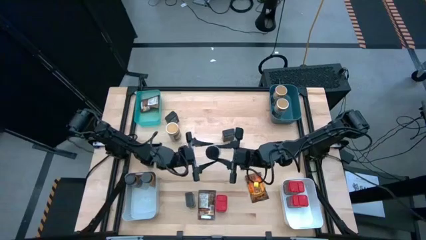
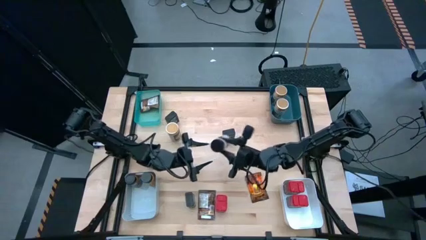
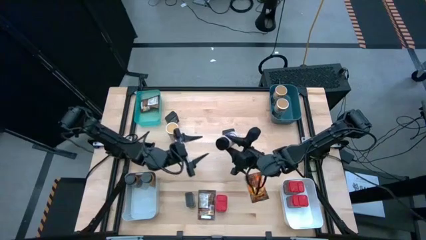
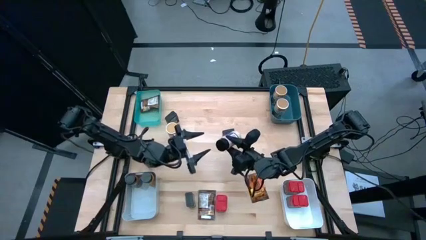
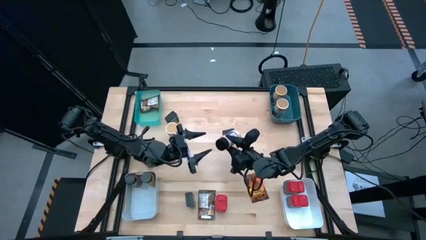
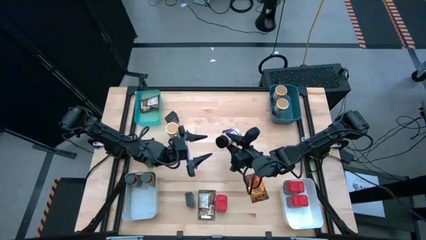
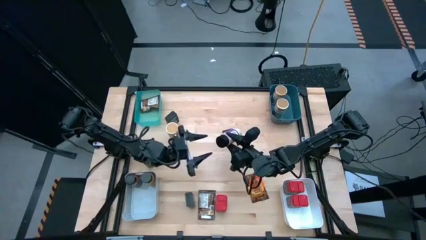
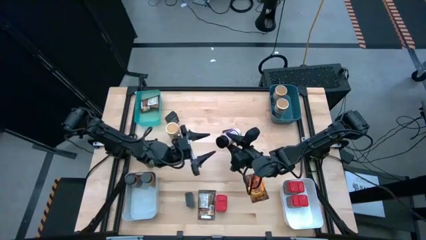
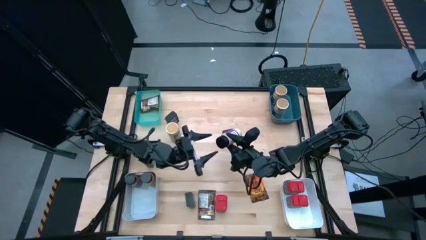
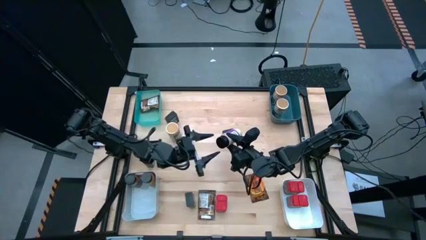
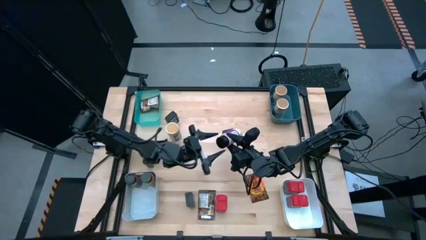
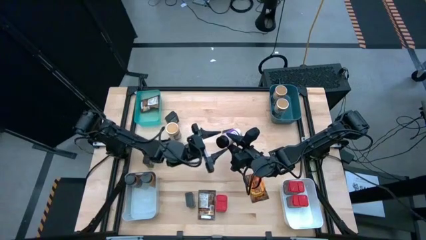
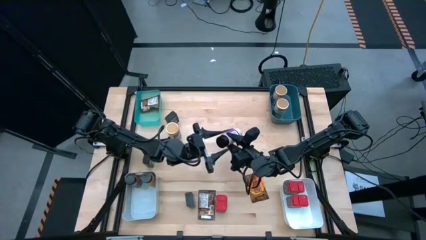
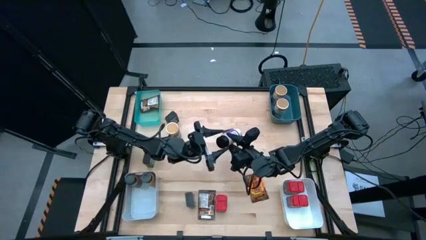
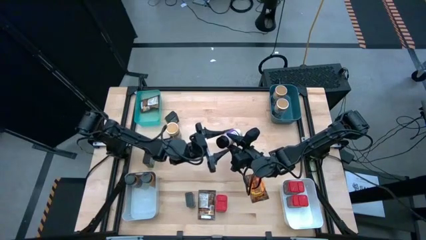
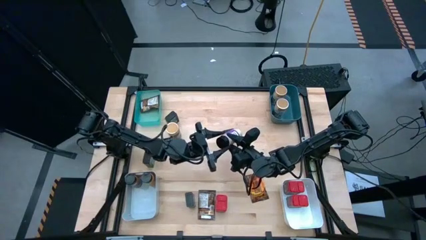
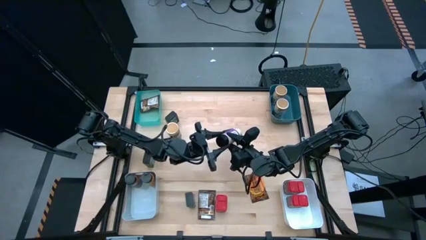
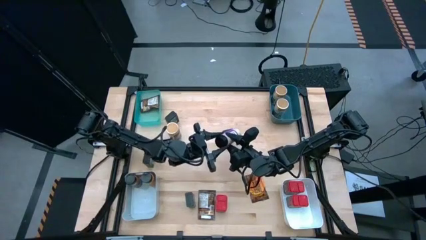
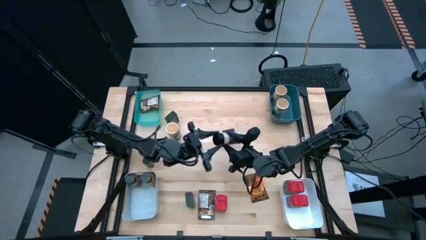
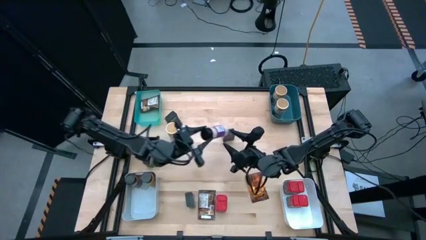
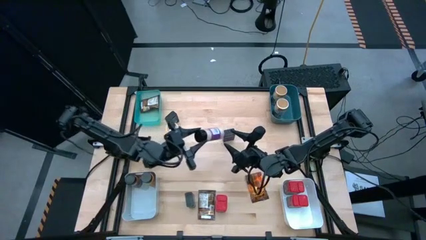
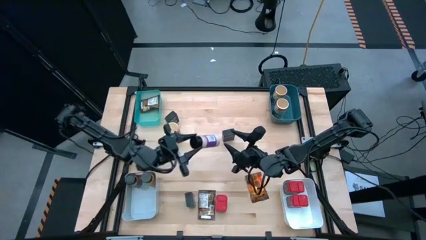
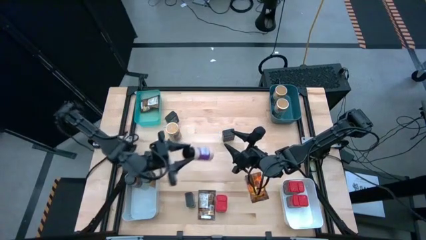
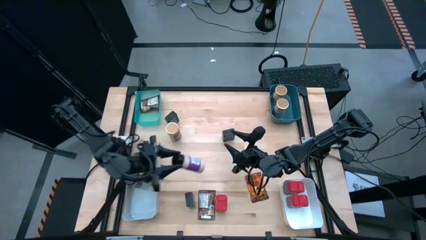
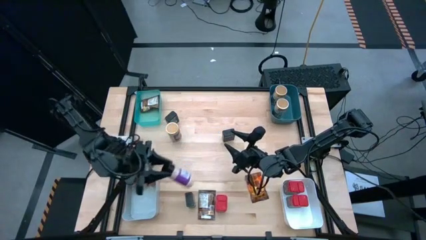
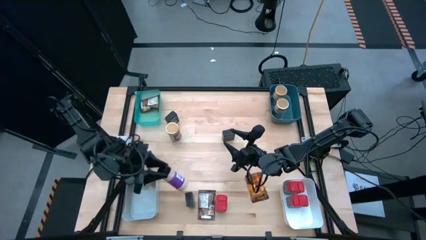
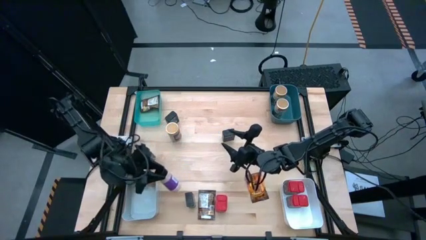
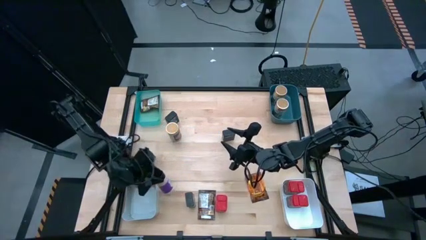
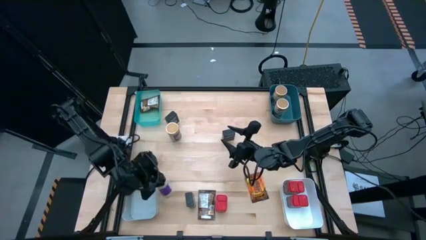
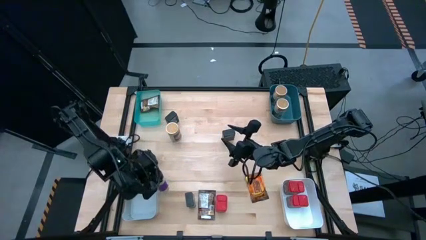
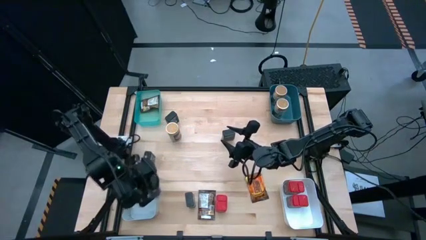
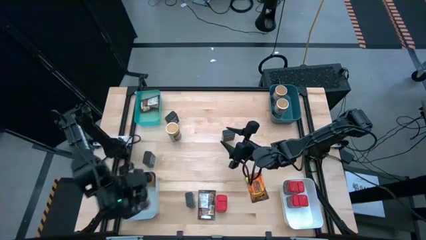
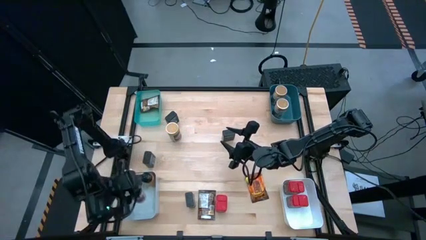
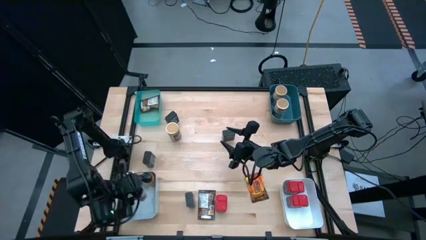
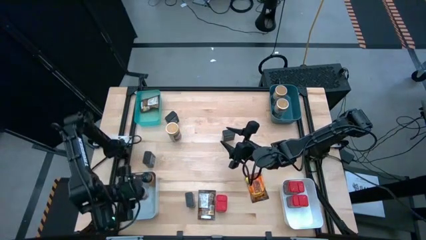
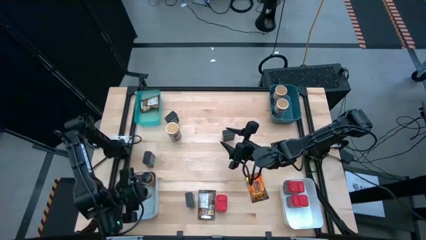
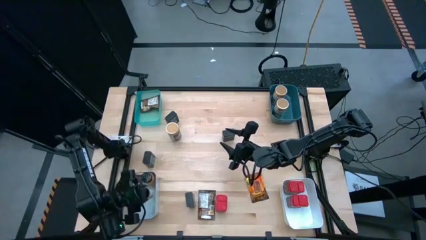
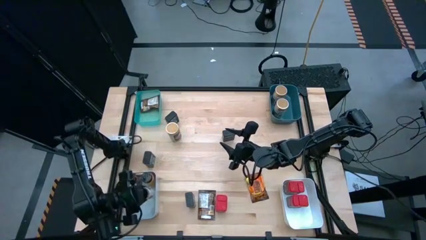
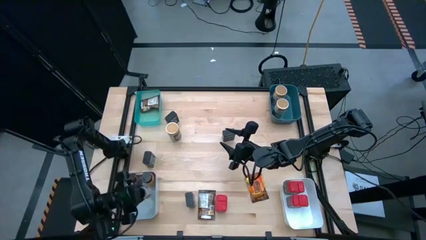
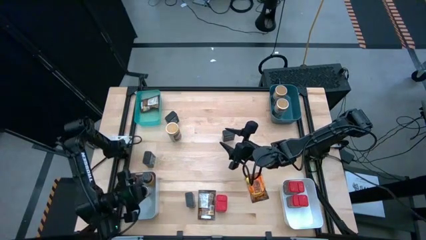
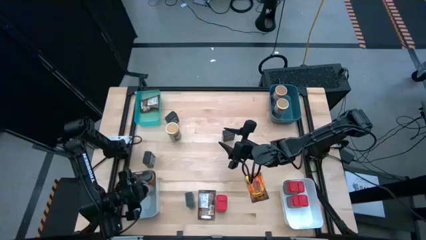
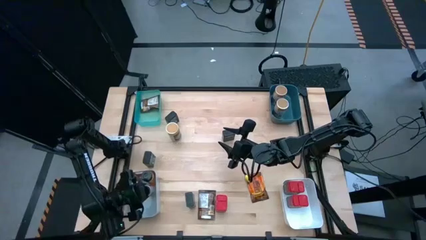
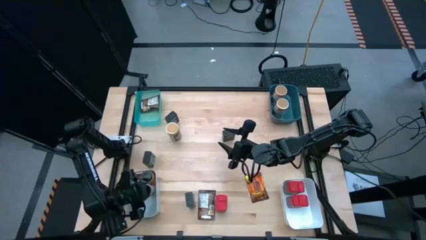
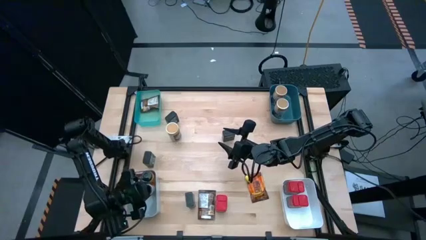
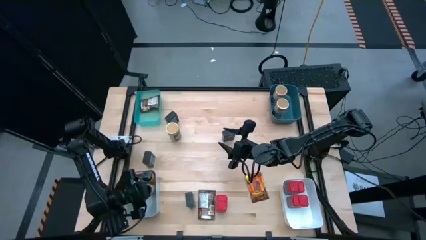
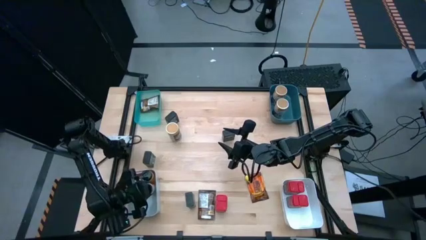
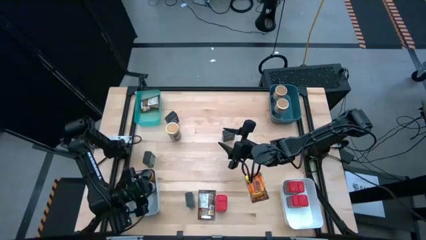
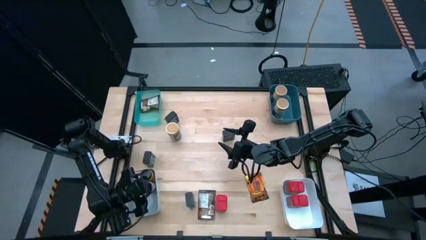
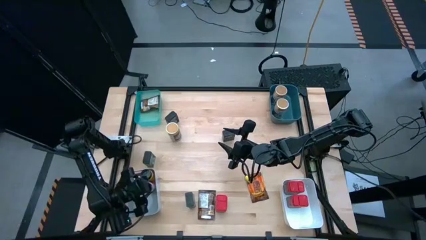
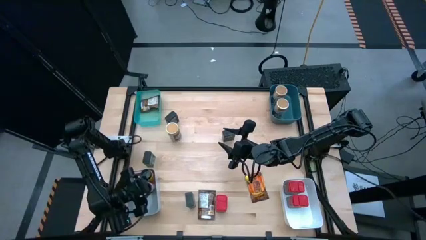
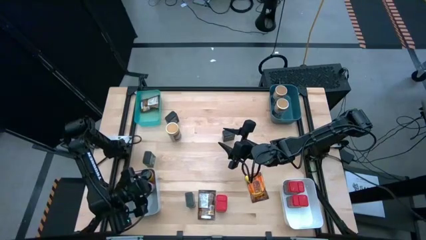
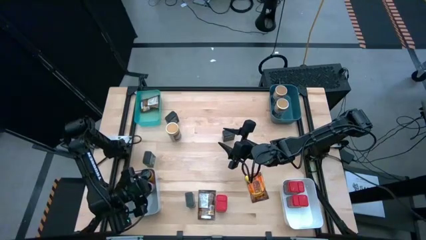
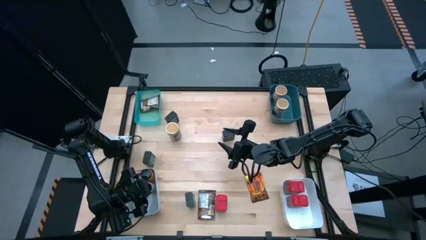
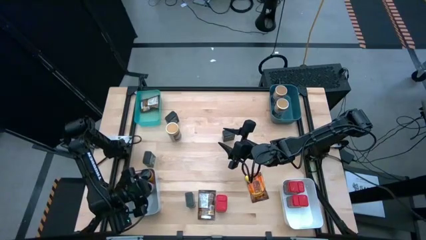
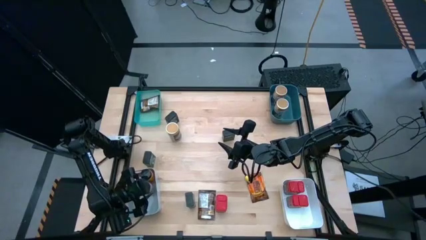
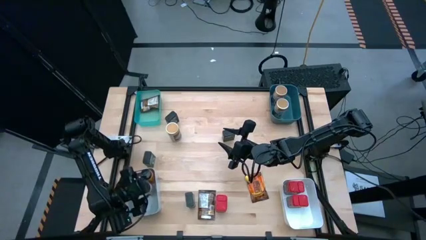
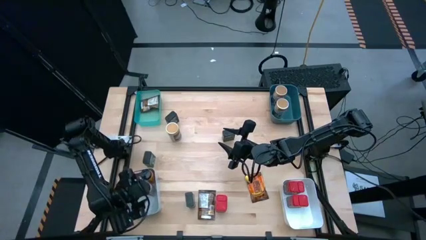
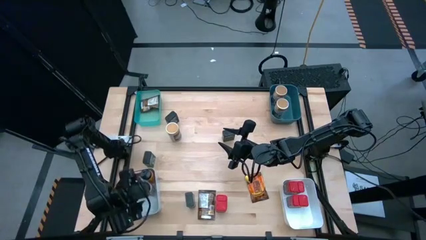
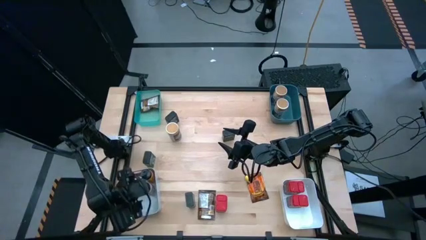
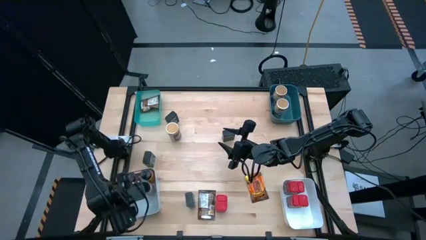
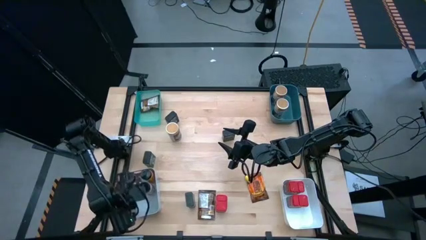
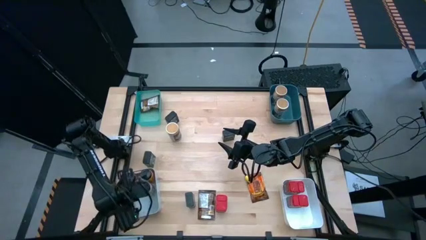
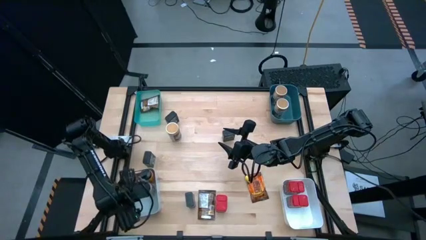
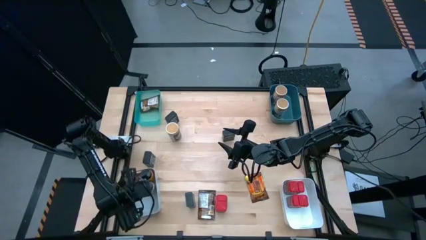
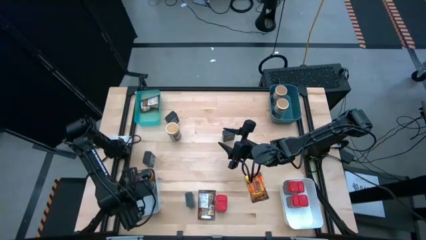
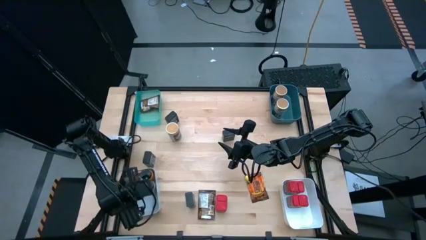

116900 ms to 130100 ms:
Task: Sort spices by type
Put the purple seasoning bottle into the gray bin

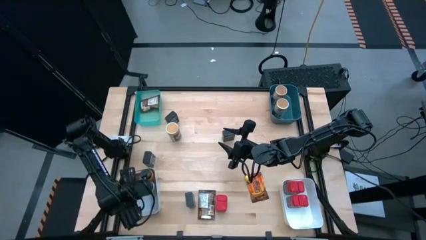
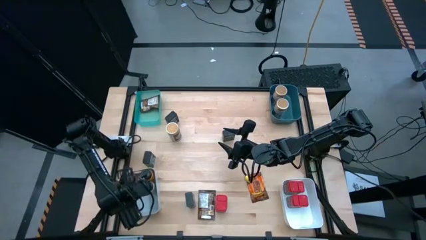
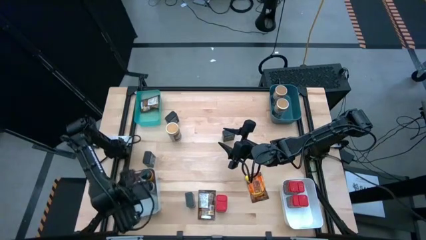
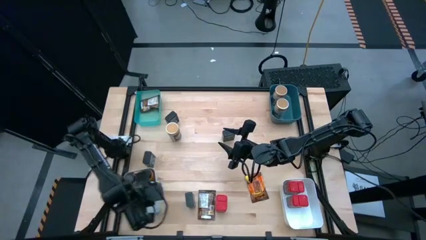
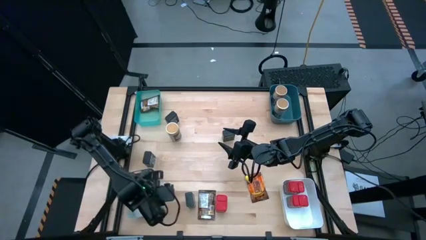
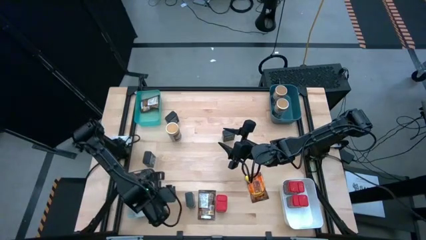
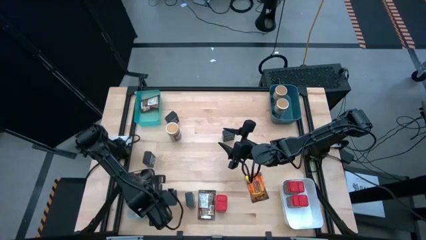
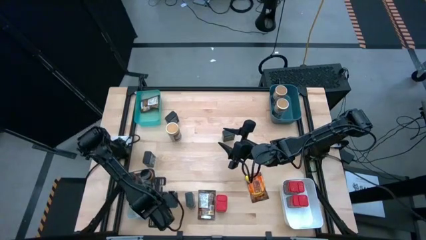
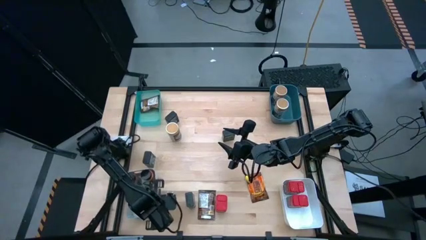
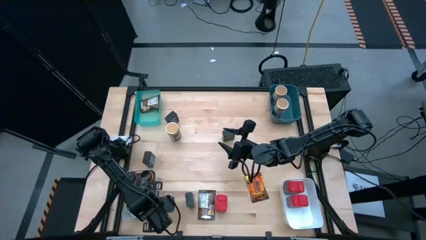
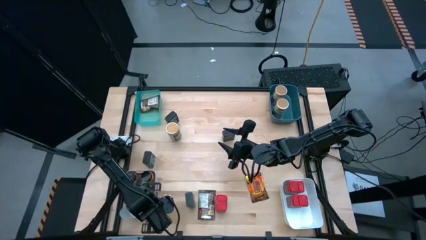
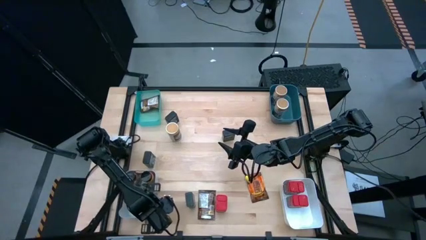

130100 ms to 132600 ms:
Adjust the gray bin
